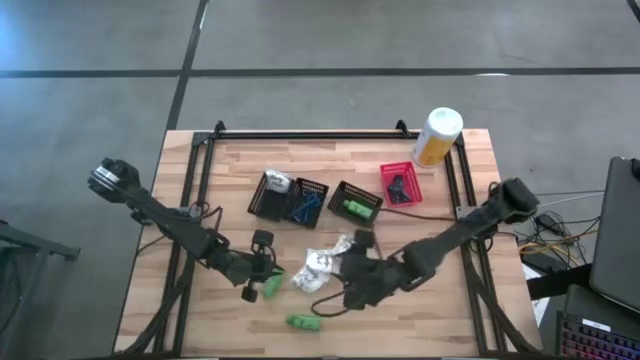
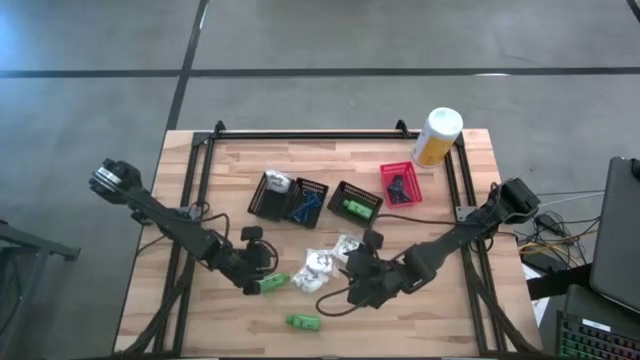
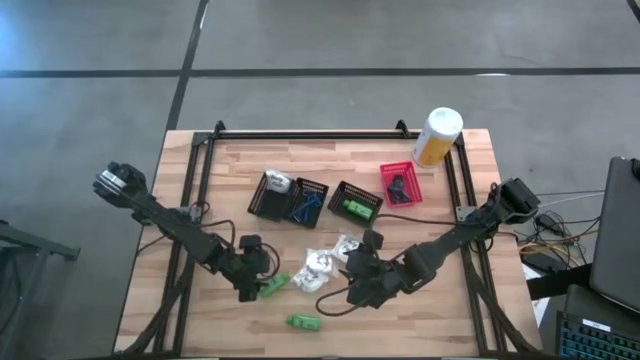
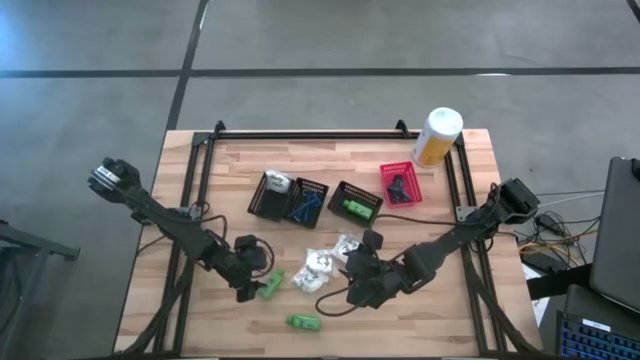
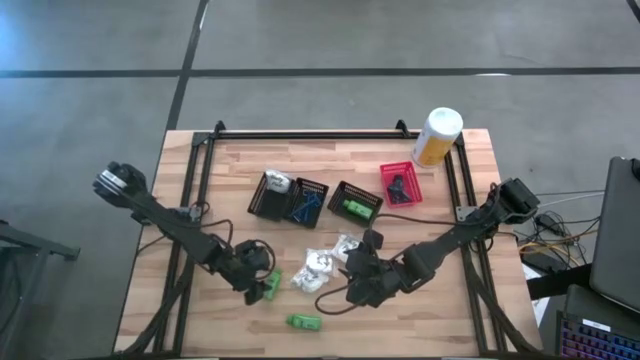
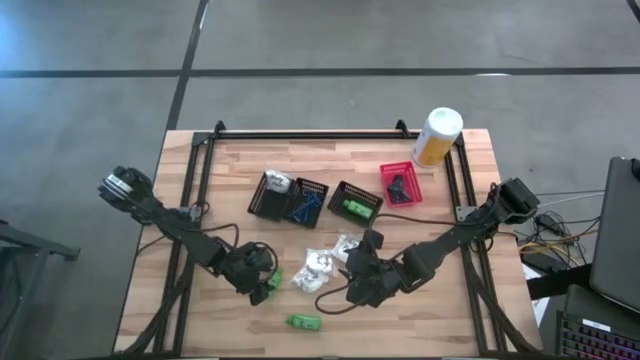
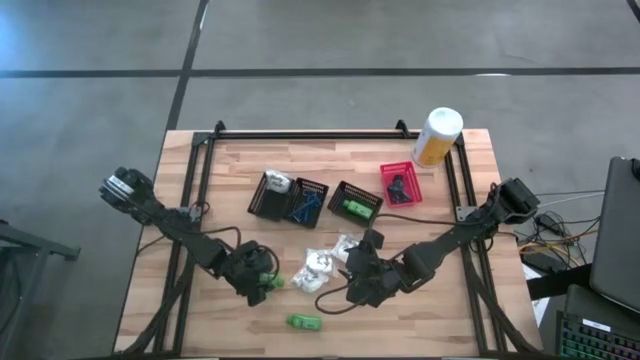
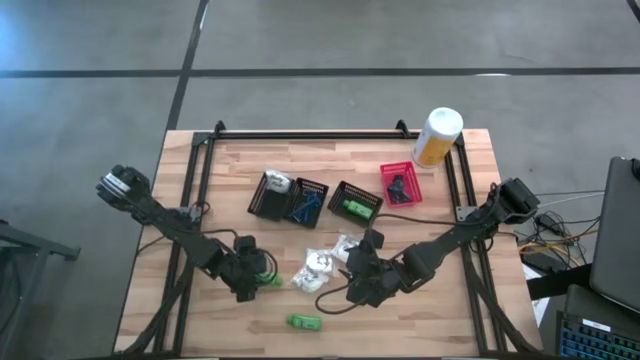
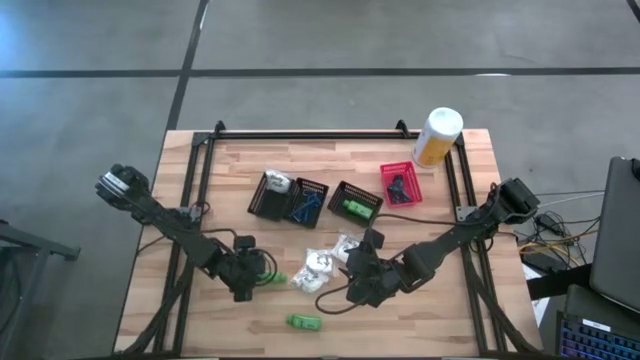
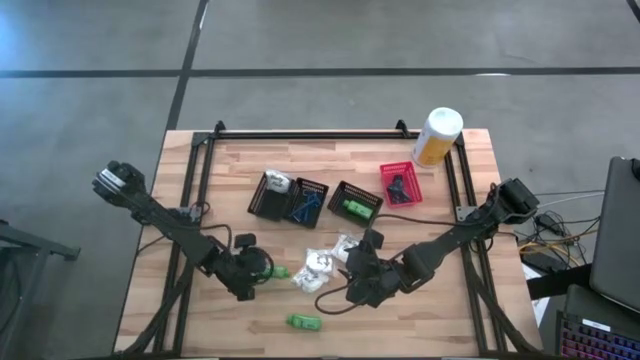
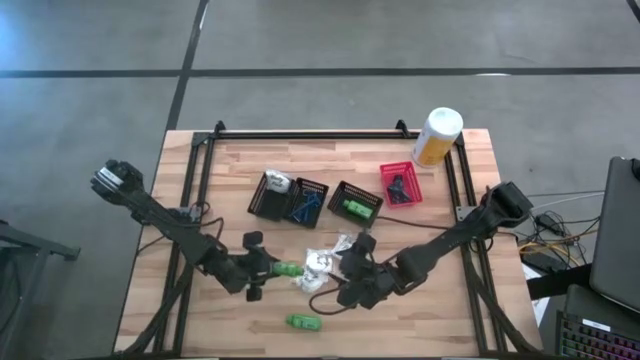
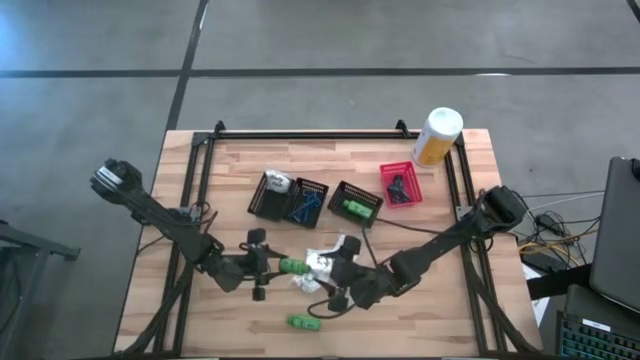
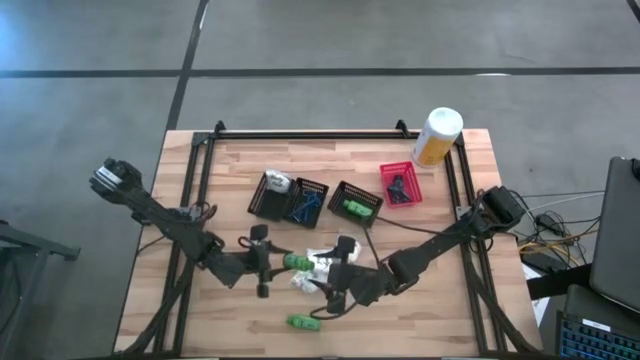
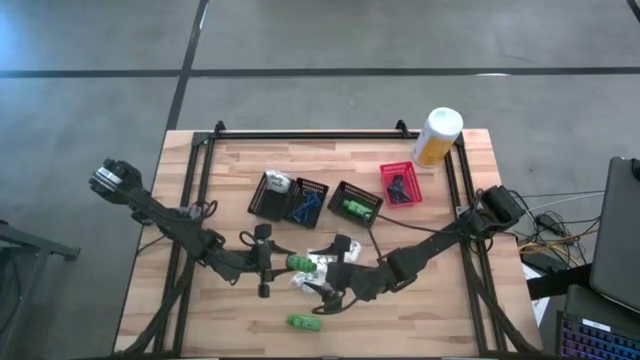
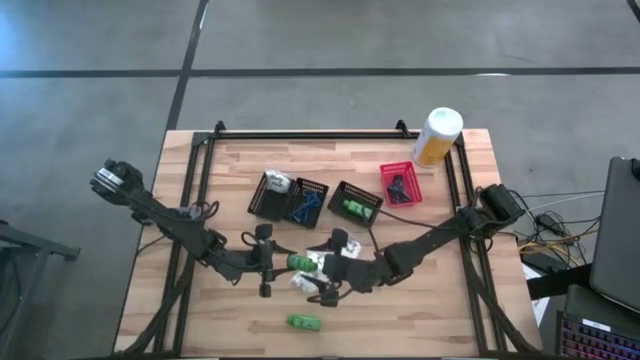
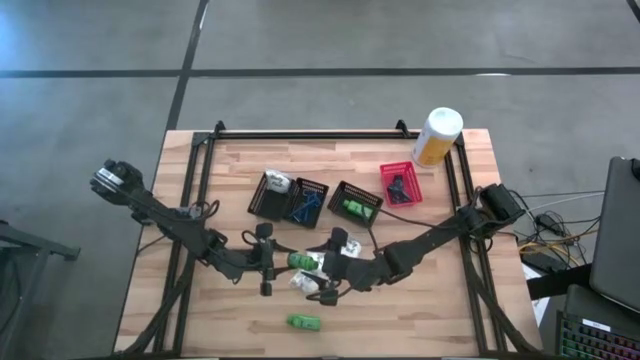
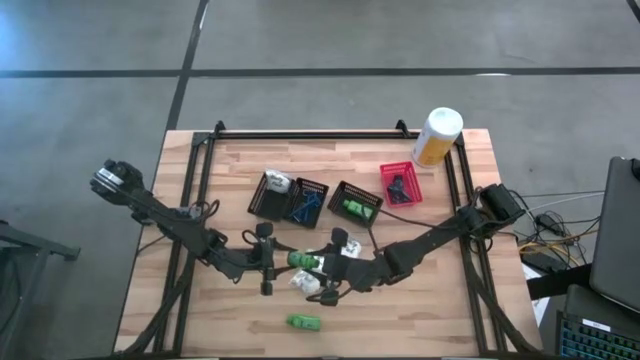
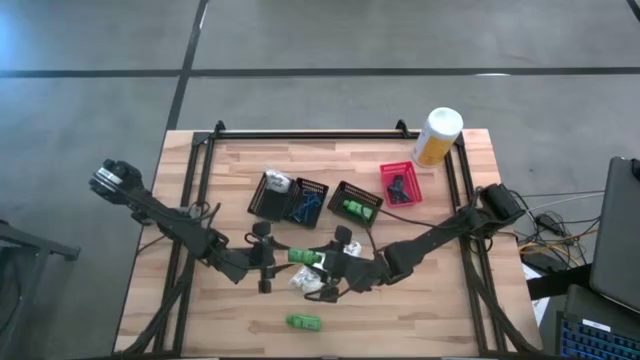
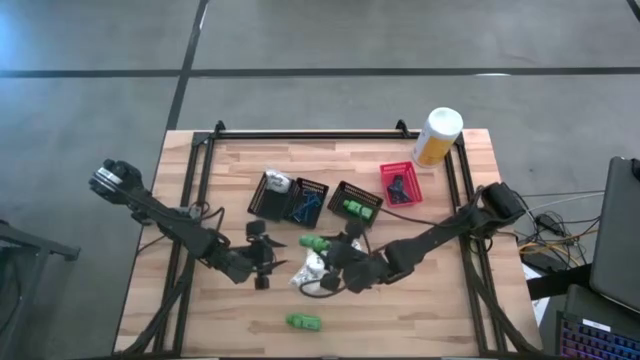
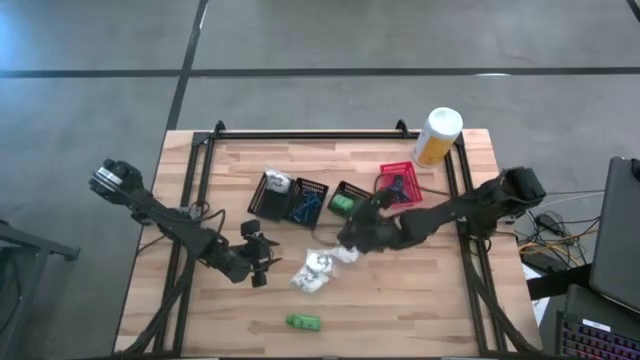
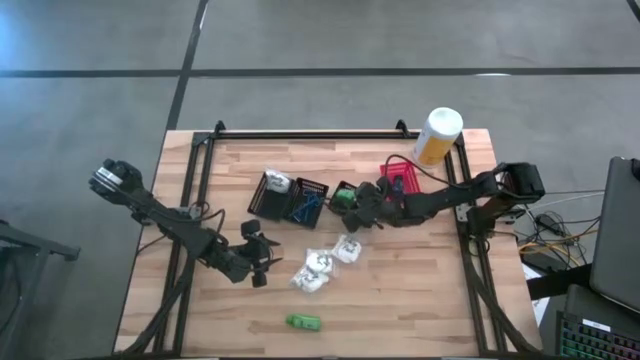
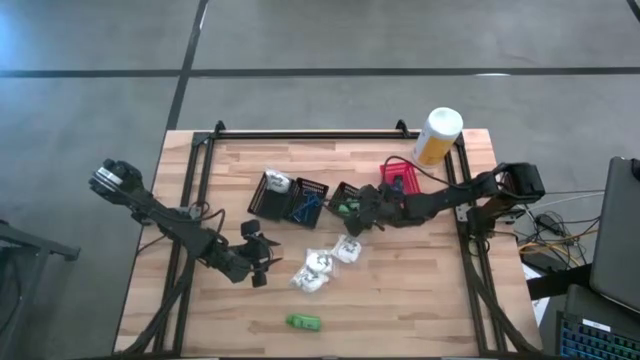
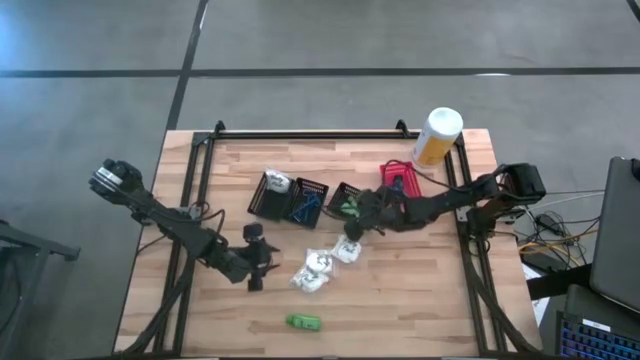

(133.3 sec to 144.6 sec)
Task: Pick & Place Travel size toiletries
Put the top left green shampoo into the right black bin

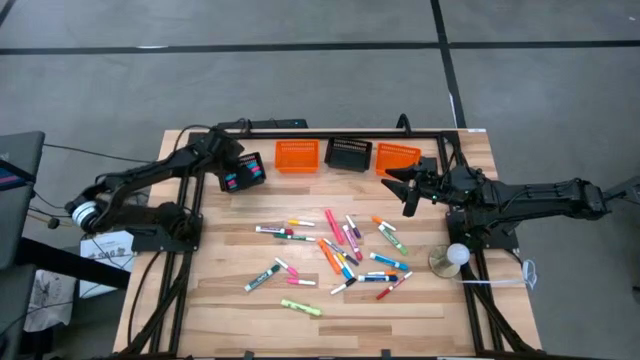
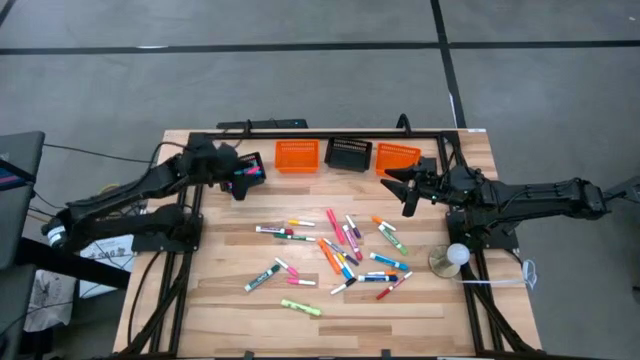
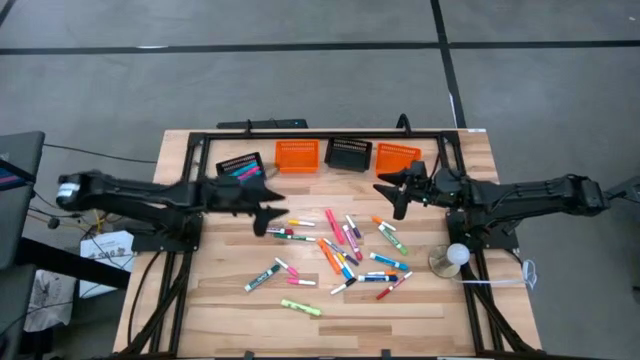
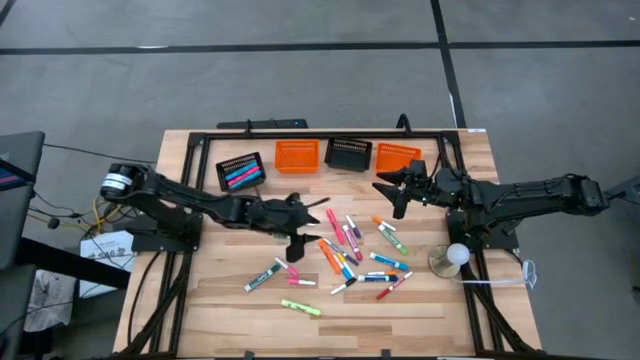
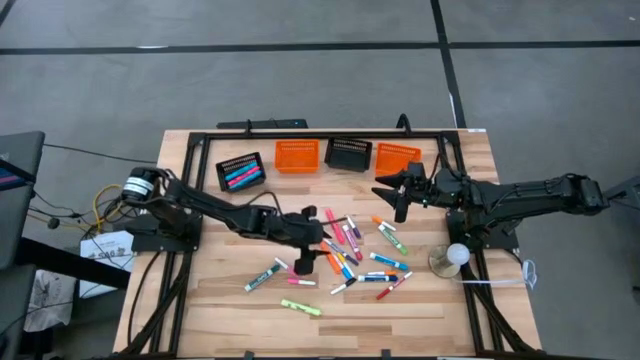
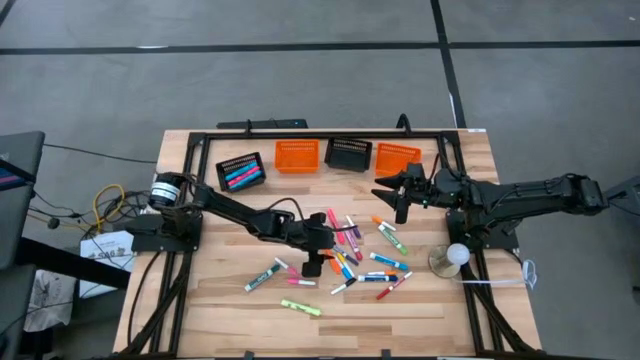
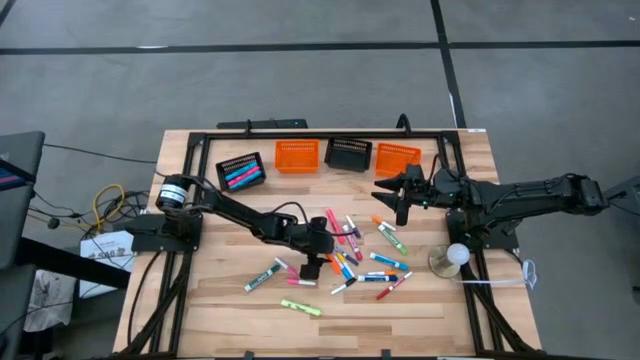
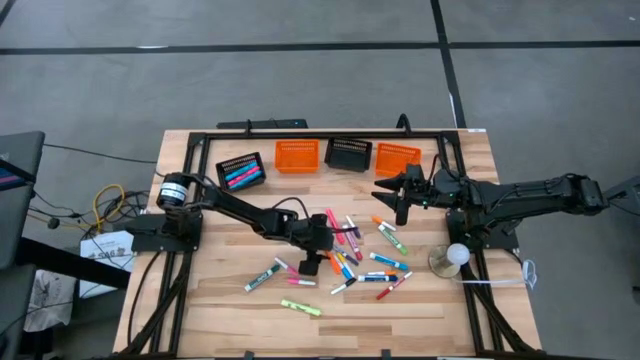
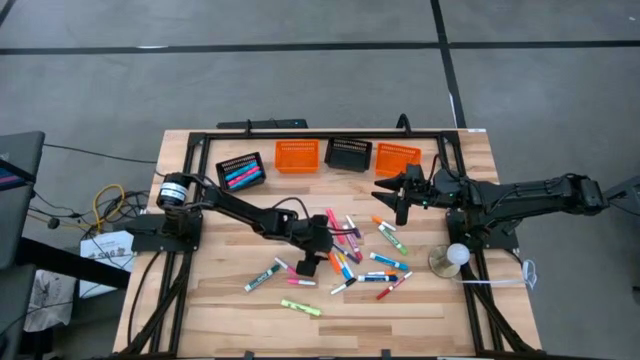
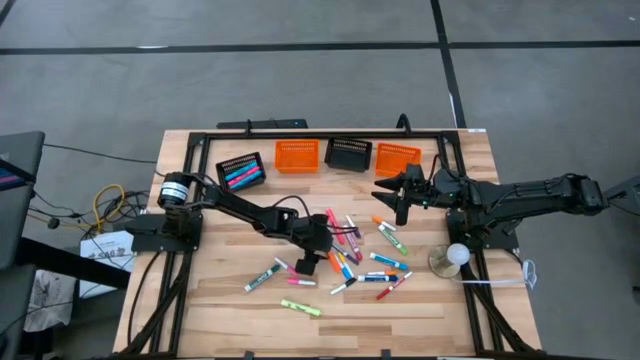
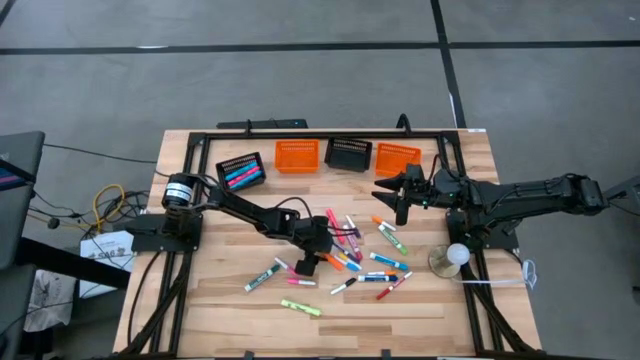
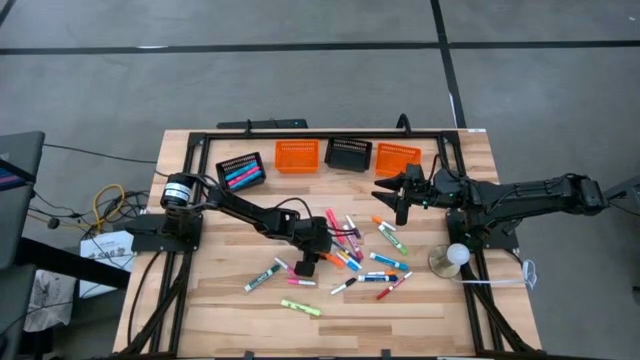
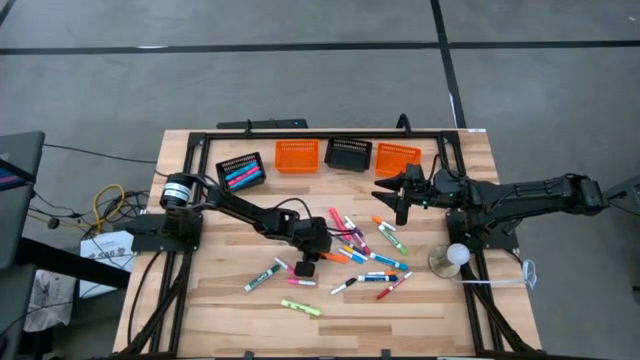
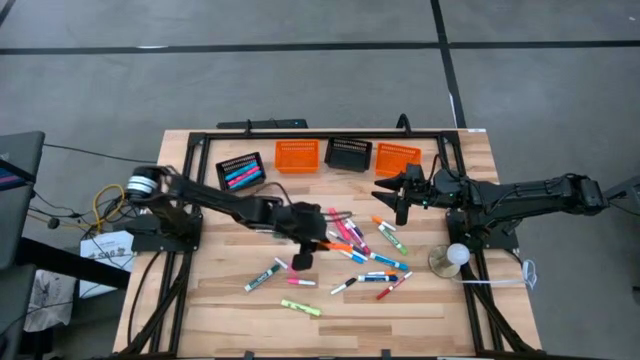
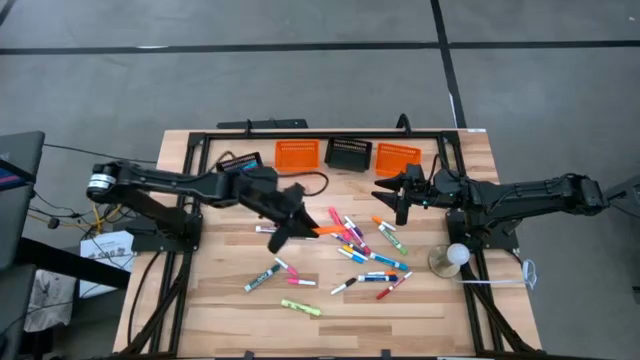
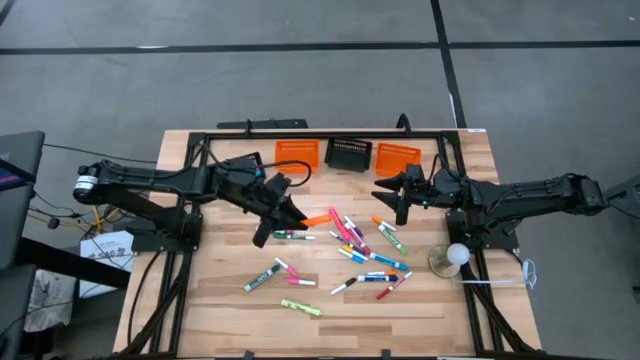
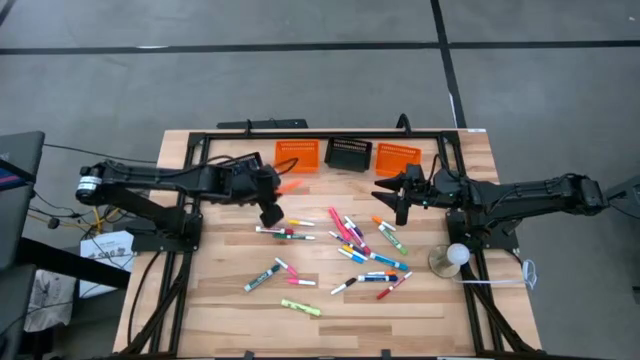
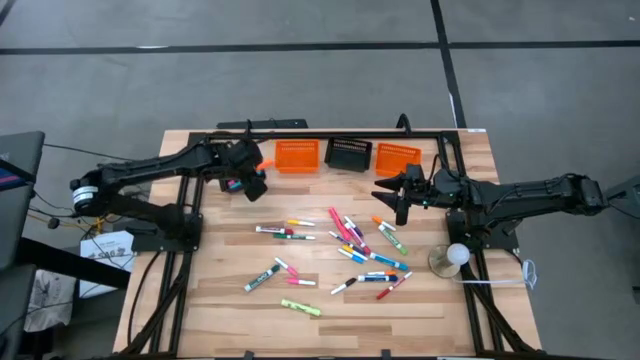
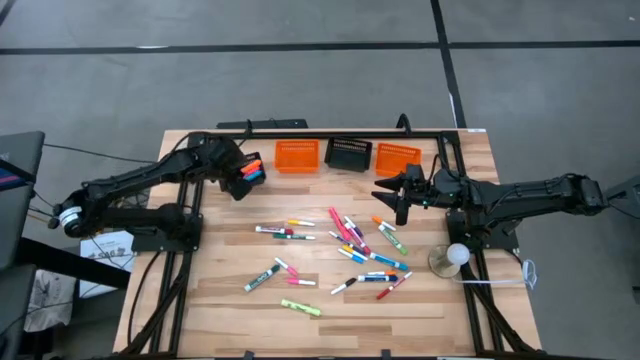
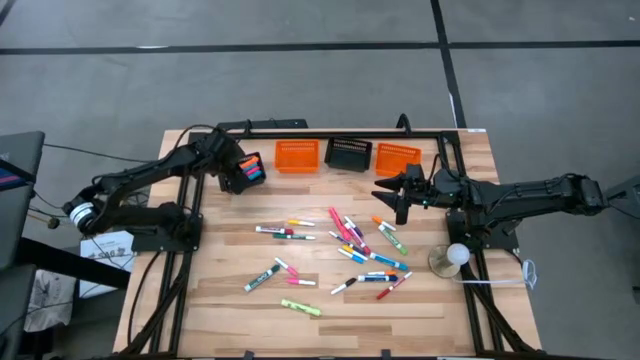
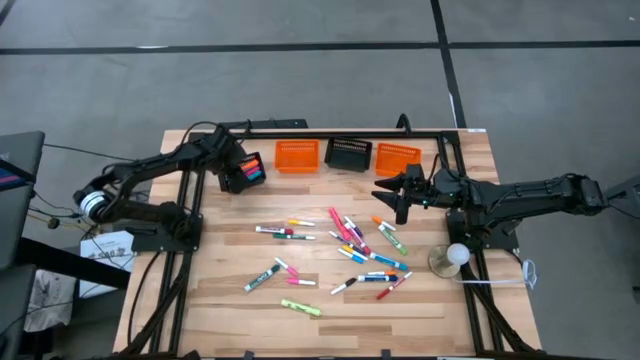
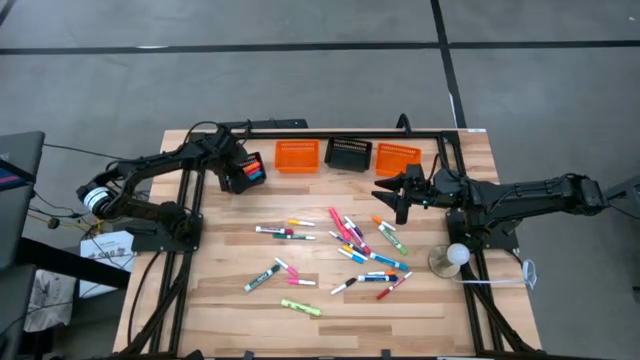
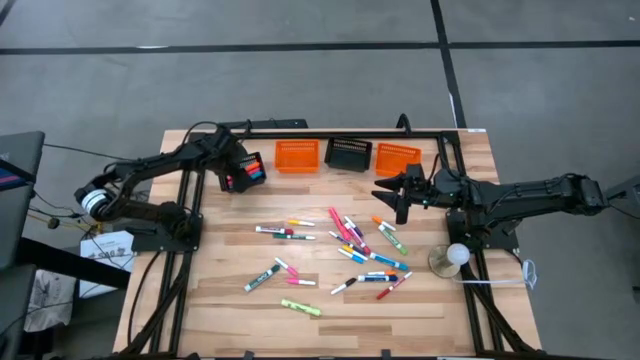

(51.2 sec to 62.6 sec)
Task: Pick & Place Markers
Put the large orange highlighter pen into the left black bin
